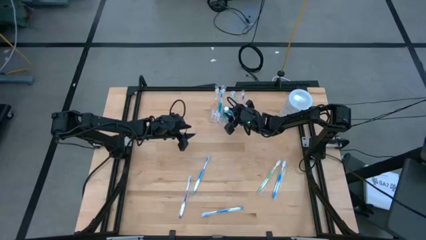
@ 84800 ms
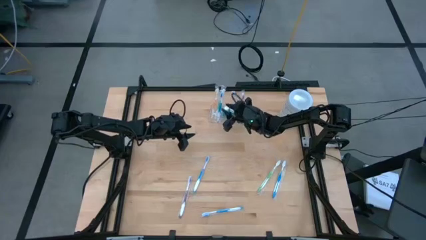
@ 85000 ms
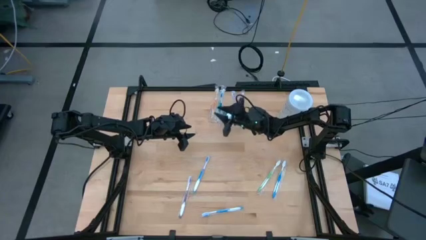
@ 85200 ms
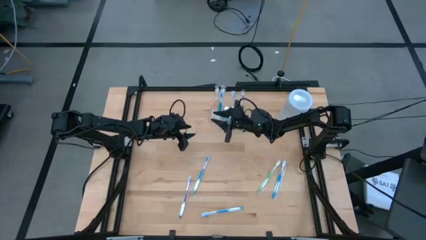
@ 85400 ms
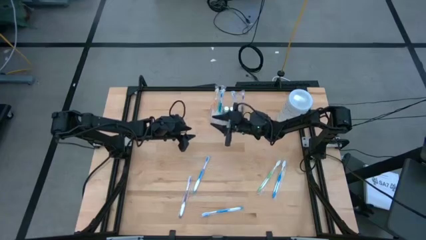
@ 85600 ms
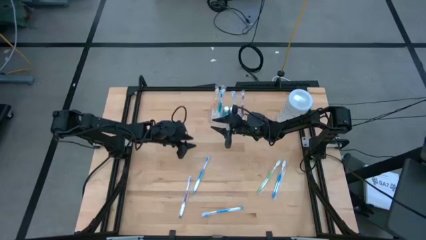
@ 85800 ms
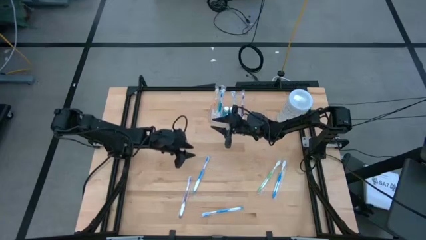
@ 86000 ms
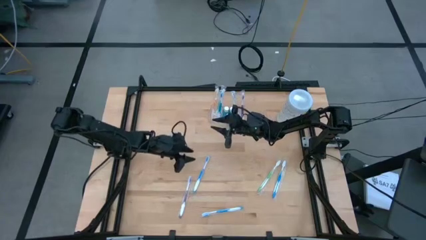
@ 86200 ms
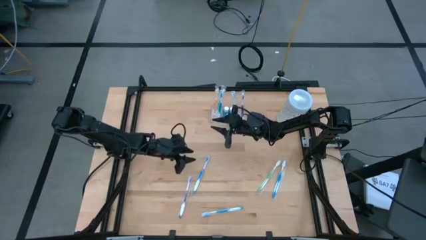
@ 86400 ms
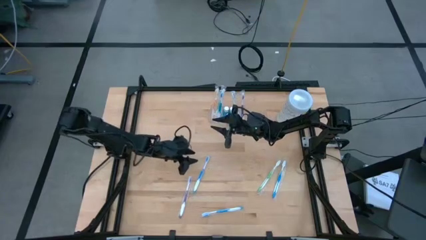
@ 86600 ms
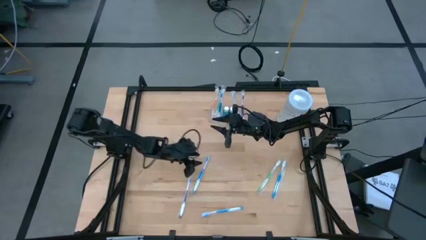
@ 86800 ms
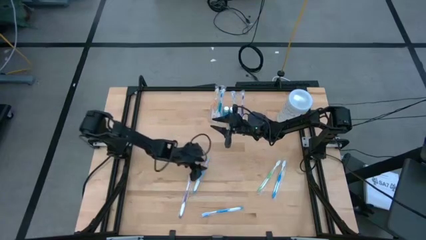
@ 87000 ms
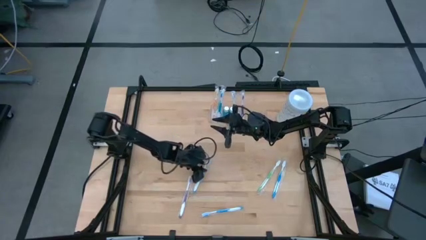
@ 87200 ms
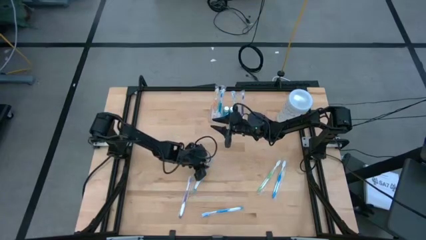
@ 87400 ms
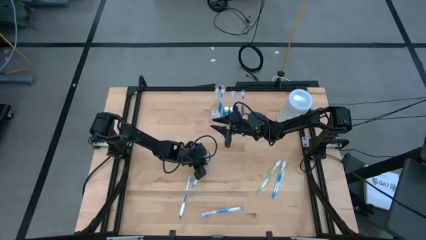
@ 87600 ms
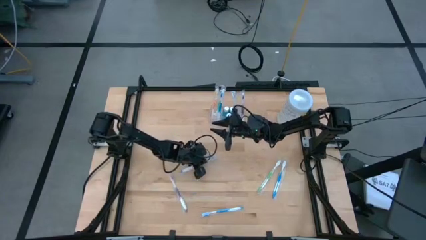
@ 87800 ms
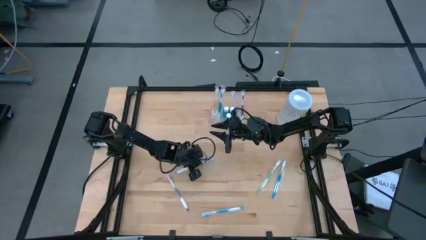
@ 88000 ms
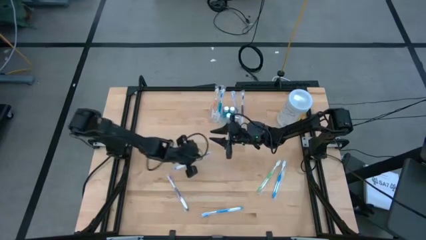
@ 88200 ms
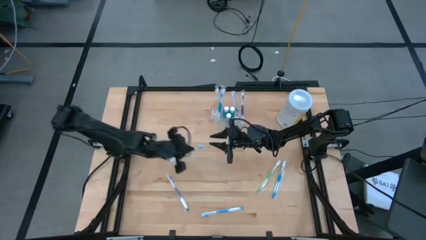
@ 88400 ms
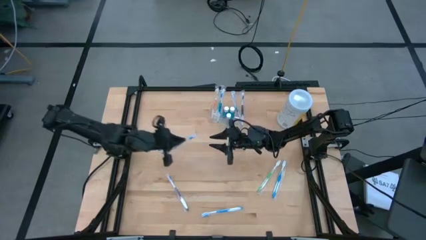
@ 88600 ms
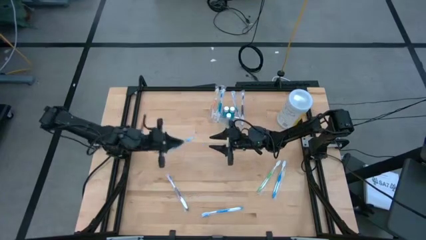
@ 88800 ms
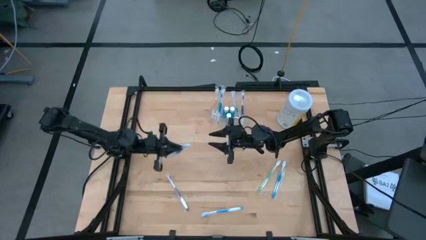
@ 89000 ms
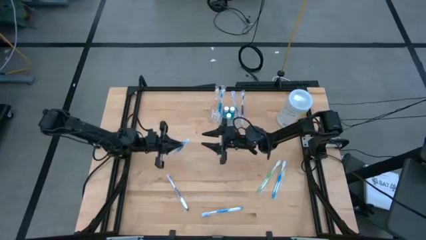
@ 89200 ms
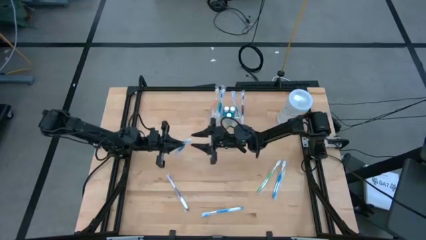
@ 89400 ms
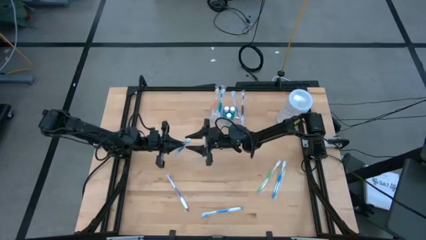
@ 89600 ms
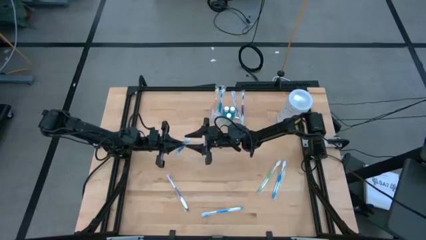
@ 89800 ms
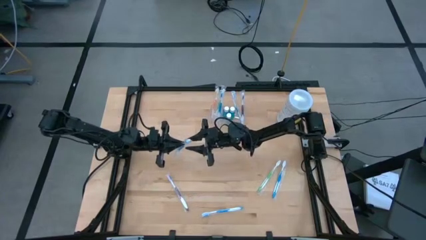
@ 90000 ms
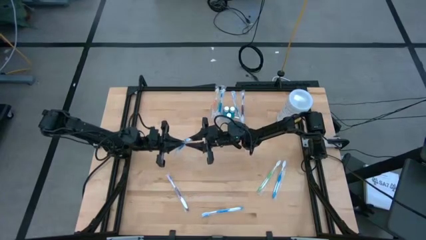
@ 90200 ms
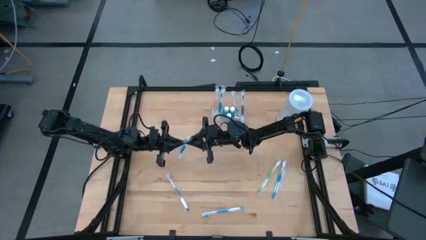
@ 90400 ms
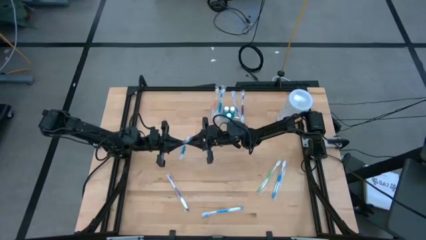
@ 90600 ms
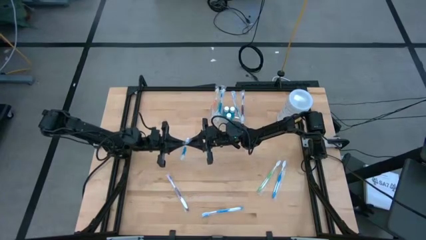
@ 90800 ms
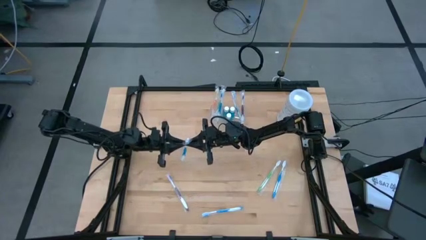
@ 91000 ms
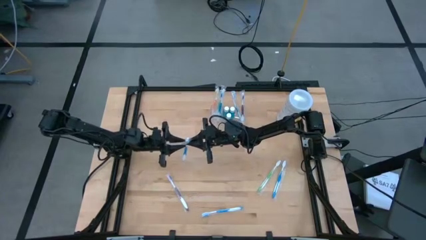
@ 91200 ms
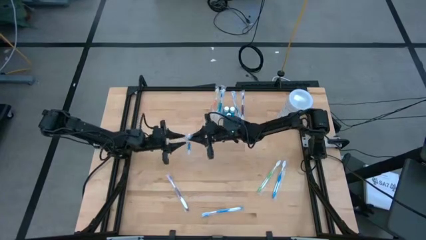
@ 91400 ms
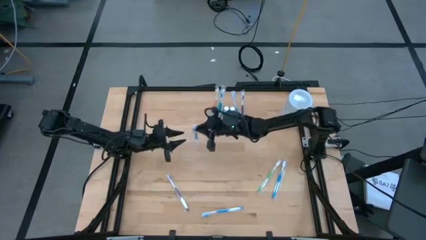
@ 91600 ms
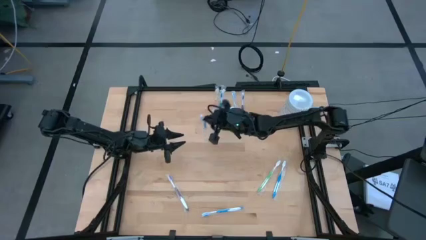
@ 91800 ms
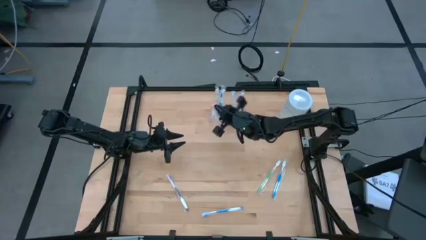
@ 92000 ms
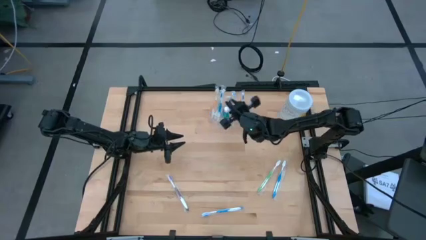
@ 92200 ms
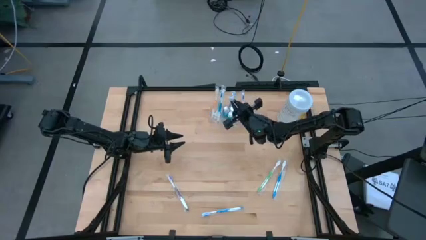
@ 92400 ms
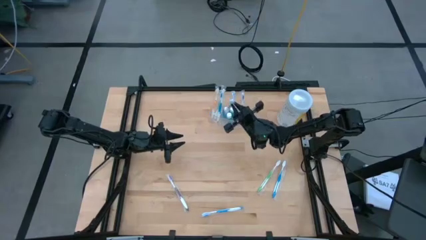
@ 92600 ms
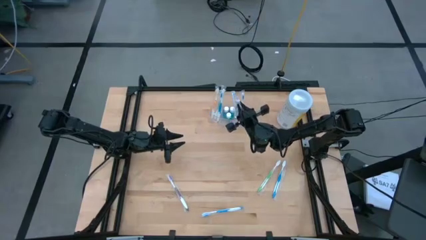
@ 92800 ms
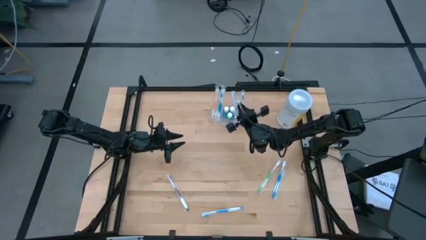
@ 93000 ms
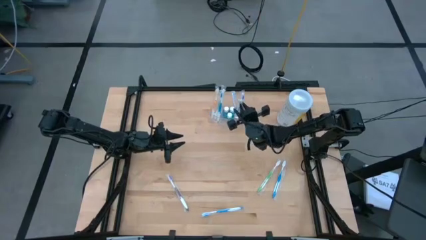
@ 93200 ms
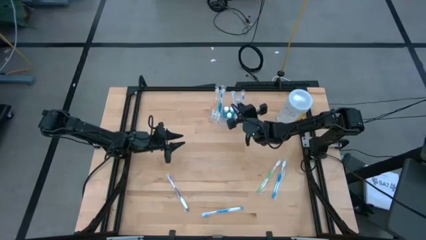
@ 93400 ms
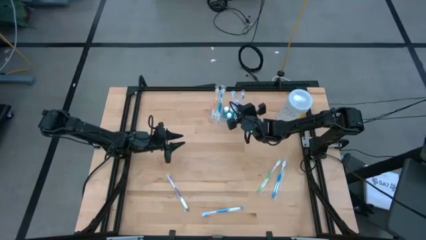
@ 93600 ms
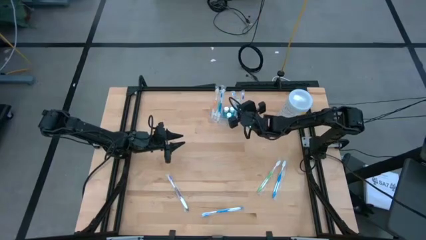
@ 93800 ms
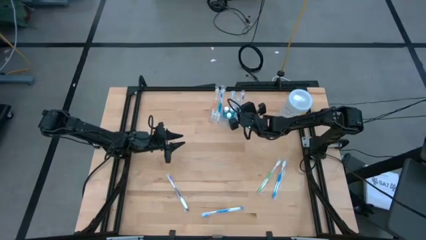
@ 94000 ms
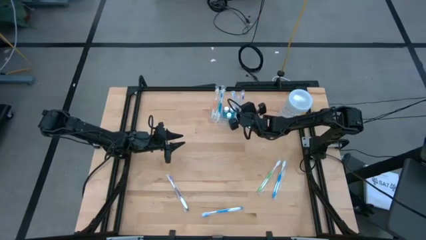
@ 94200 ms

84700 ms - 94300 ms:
Task: Pick & Place toothbrushing station
Put the top left blue toothbrush into the right section of the transparent organizer
